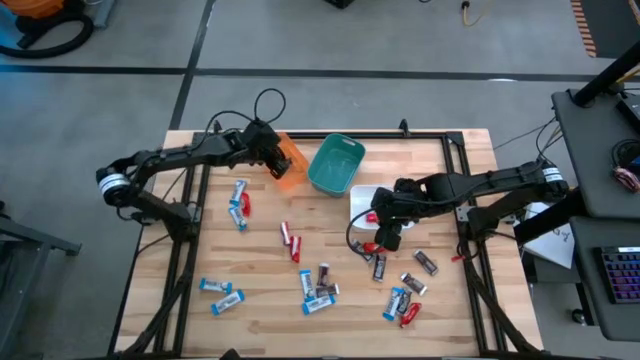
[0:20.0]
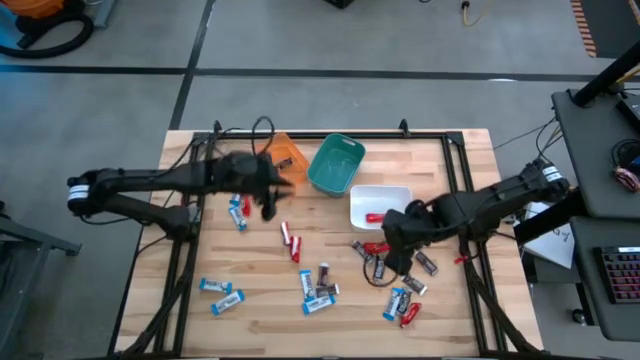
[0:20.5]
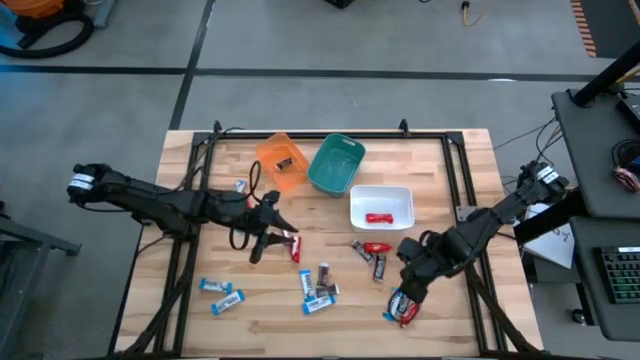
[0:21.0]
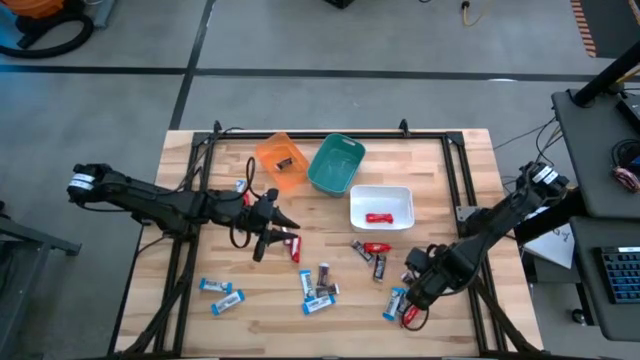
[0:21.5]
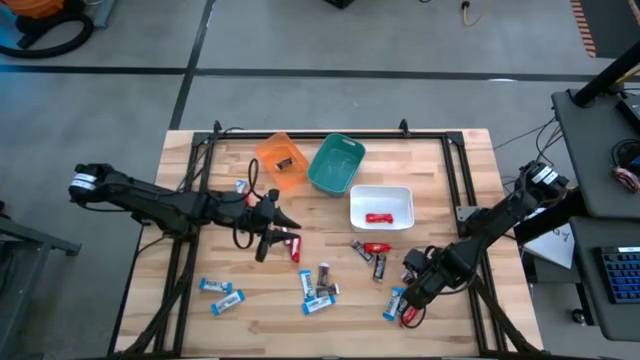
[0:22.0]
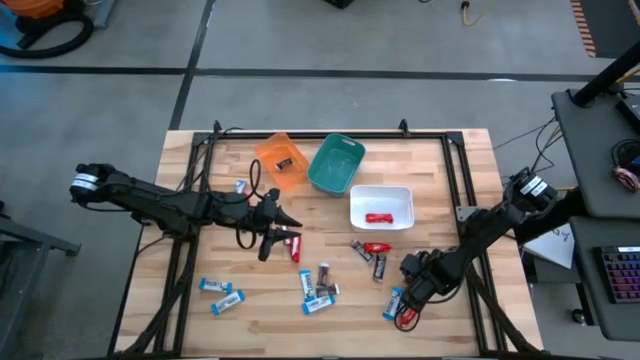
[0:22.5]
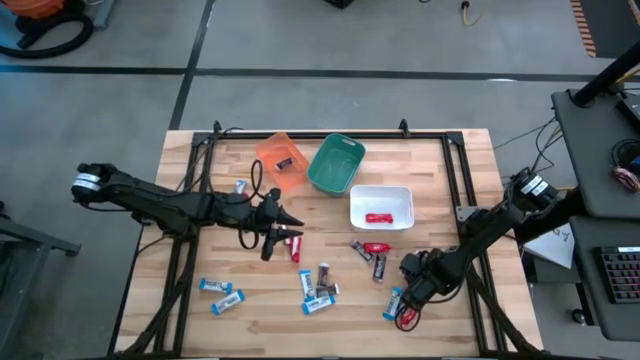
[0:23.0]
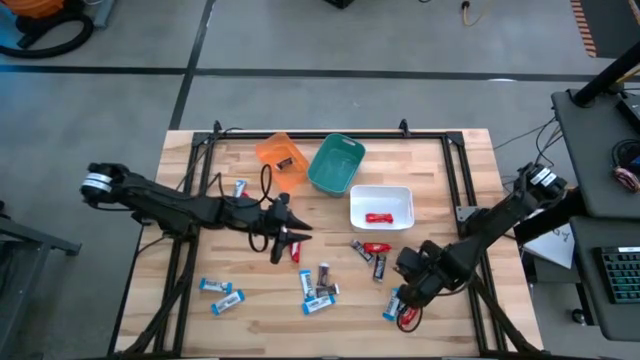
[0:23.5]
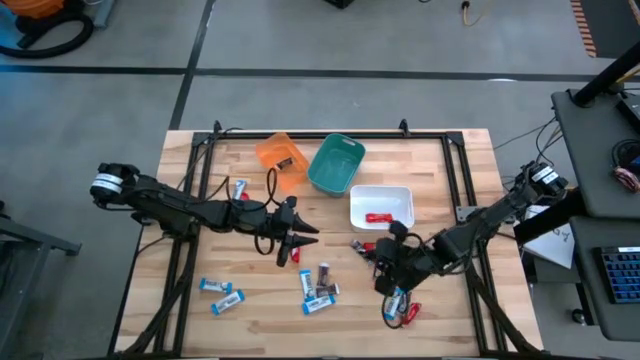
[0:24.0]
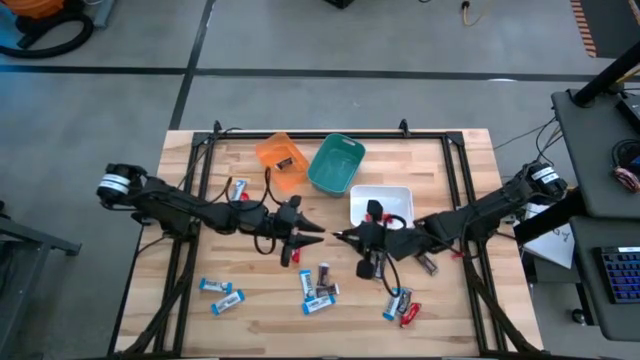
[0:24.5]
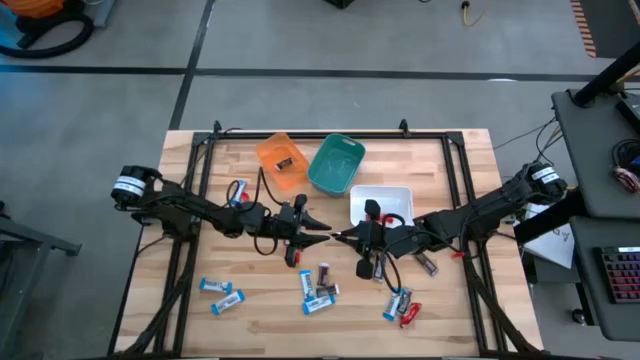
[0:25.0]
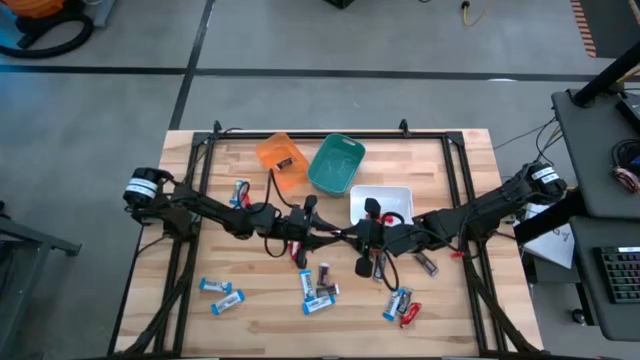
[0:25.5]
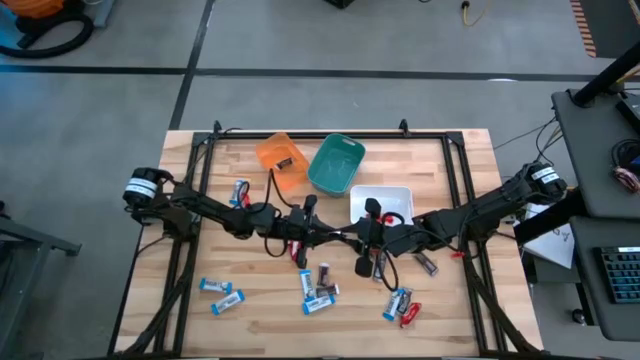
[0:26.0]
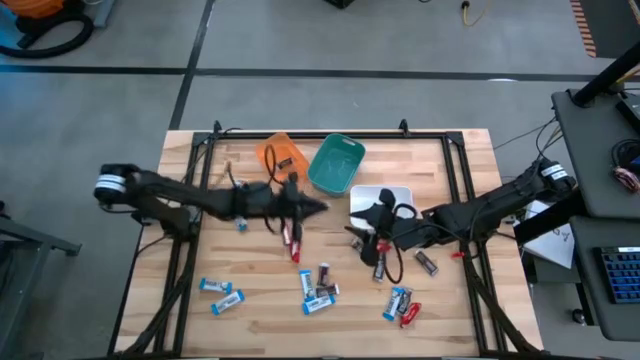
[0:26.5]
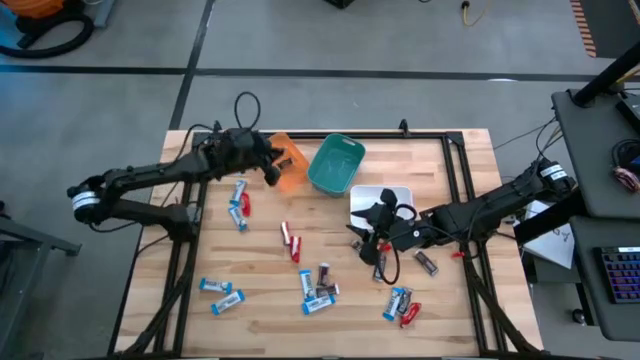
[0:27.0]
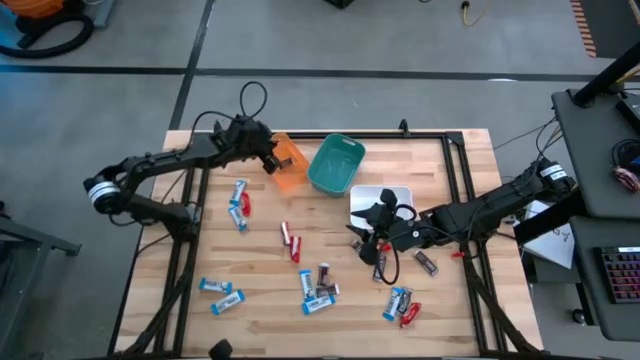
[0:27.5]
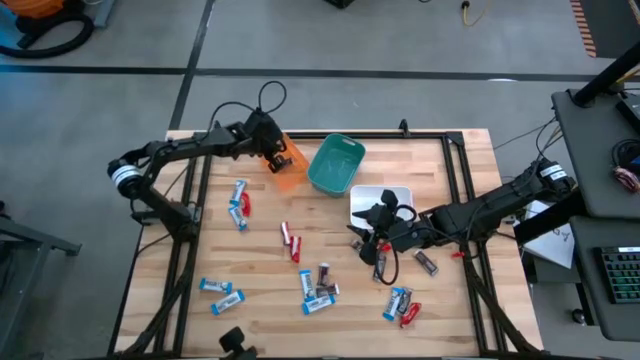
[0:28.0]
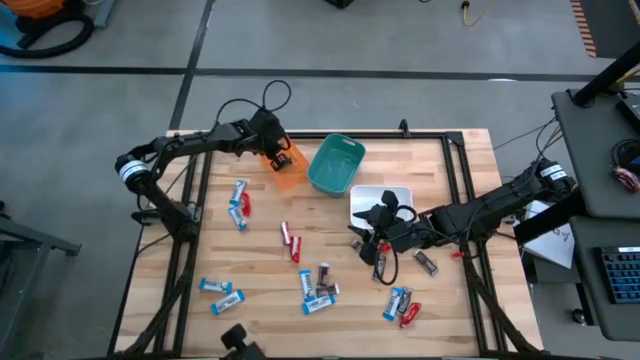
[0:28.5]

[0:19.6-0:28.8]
Task: Sort candy
Put the brown chocolate bar into the orange bin

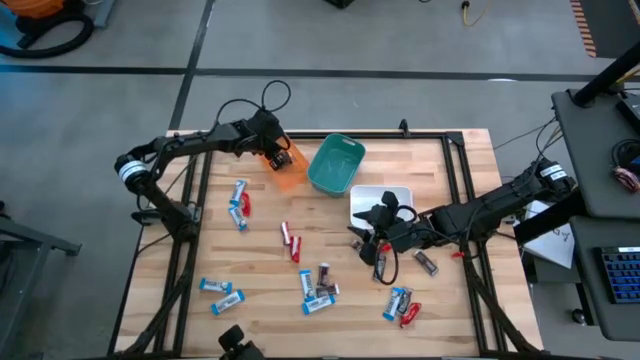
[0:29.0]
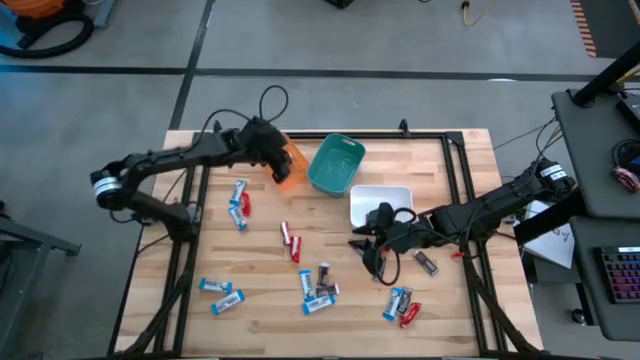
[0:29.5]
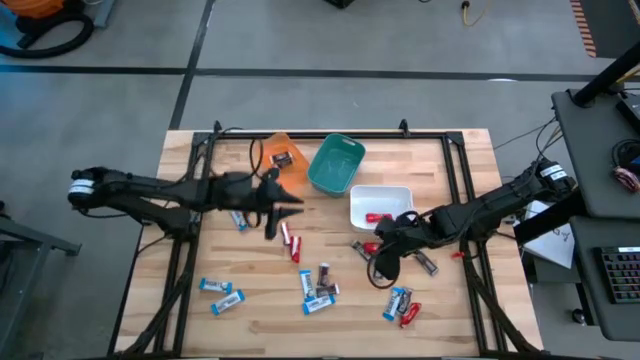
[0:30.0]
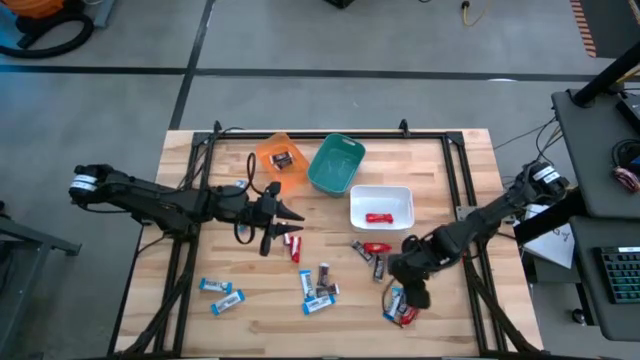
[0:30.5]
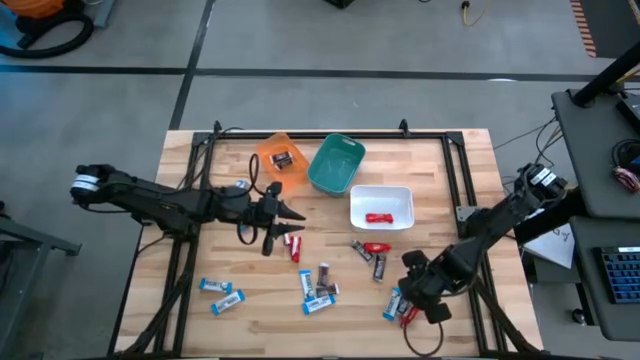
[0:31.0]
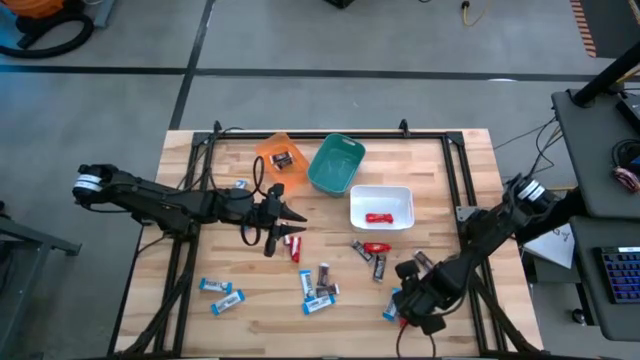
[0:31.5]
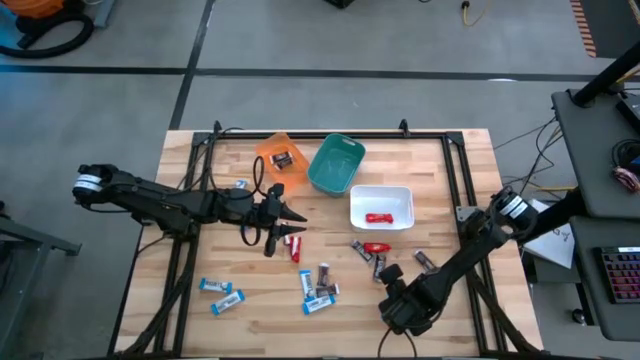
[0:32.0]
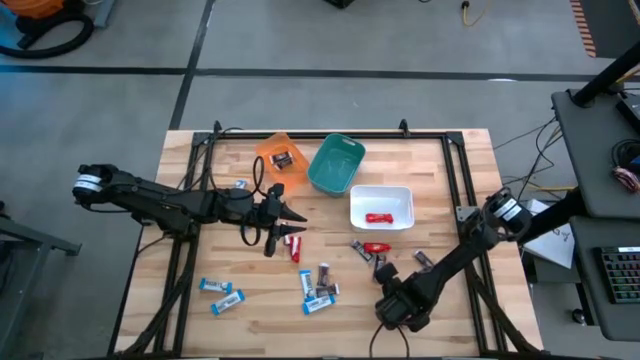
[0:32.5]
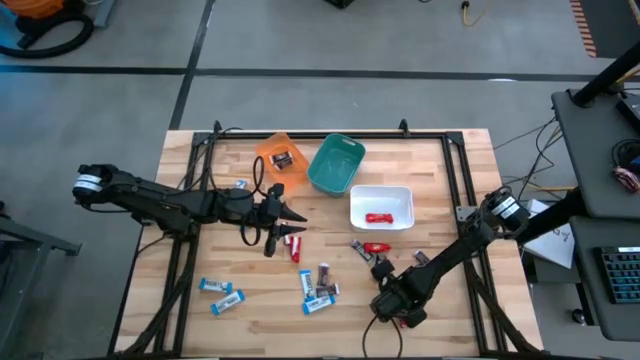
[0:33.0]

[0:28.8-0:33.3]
Put the white chocolate bar into the green bin

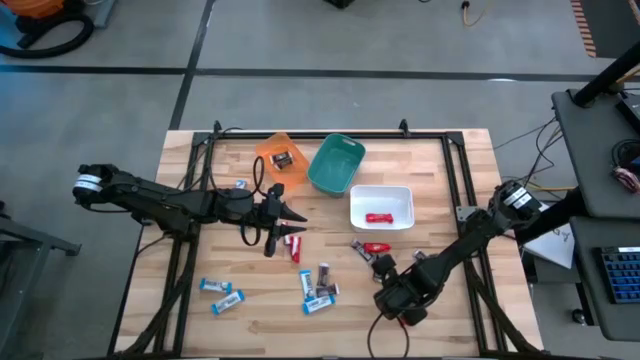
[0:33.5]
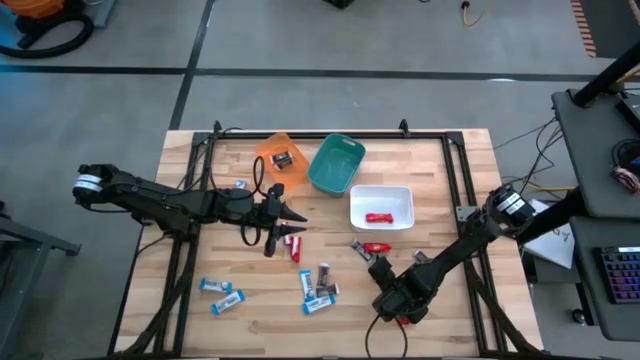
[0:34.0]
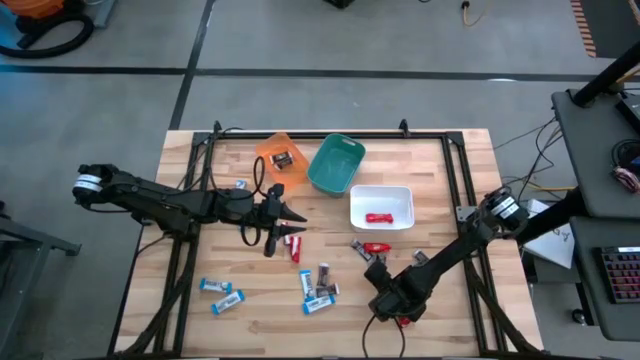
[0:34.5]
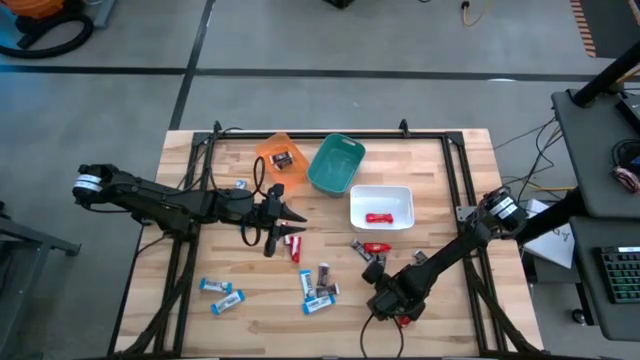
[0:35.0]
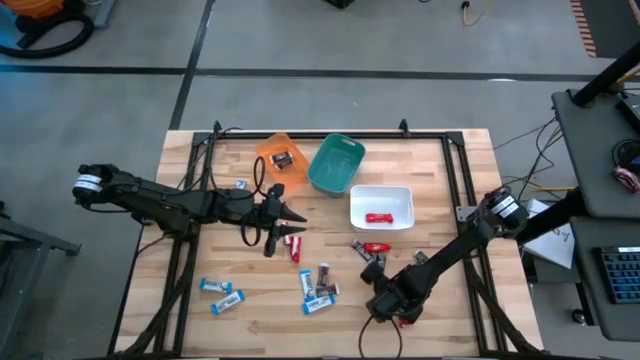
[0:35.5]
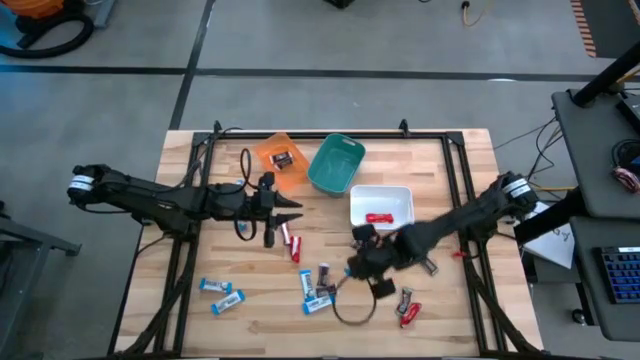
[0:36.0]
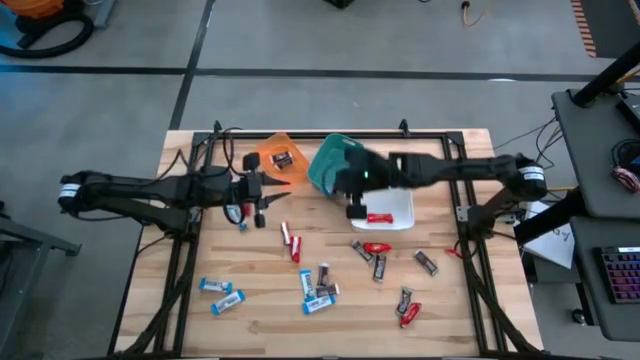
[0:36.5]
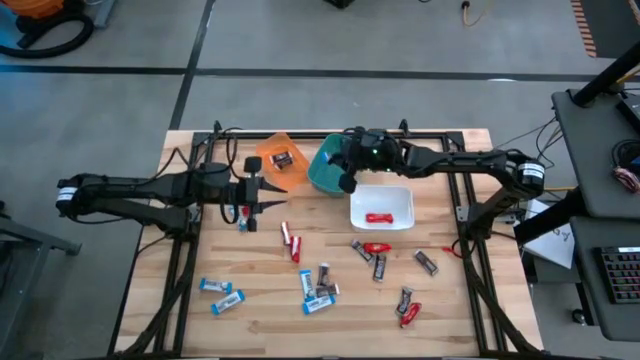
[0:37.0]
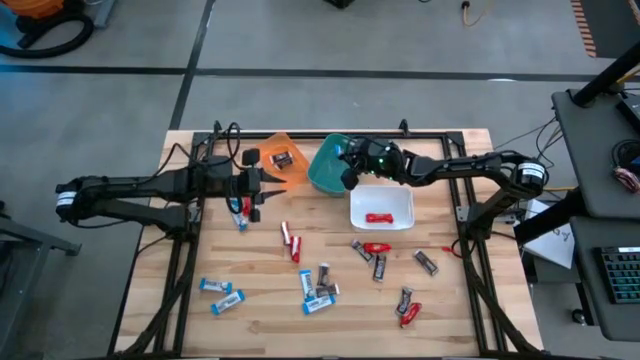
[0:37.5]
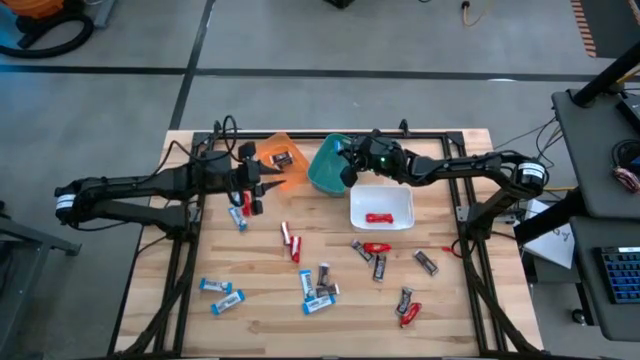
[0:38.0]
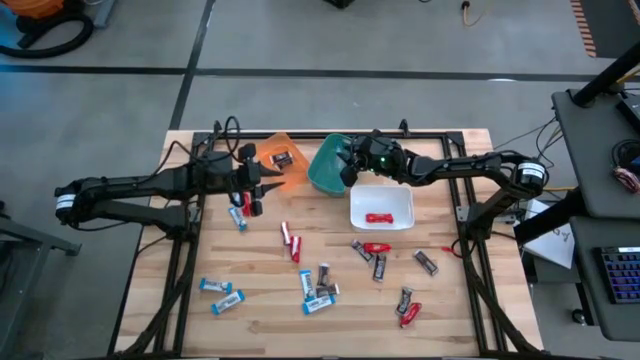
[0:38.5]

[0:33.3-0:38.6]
Put the white chocolate bar into the green bin

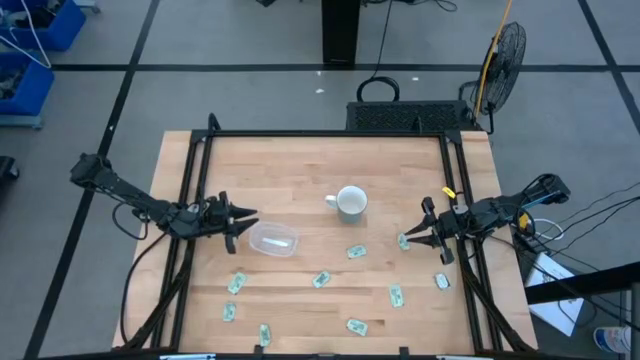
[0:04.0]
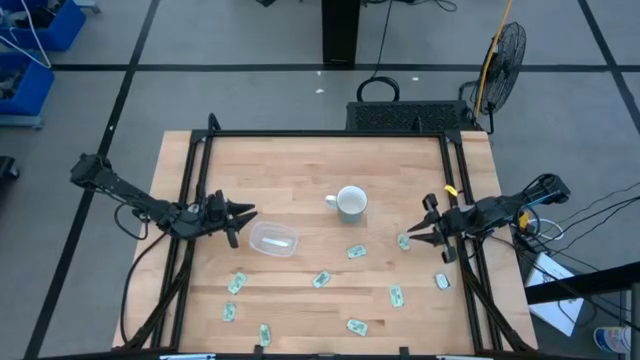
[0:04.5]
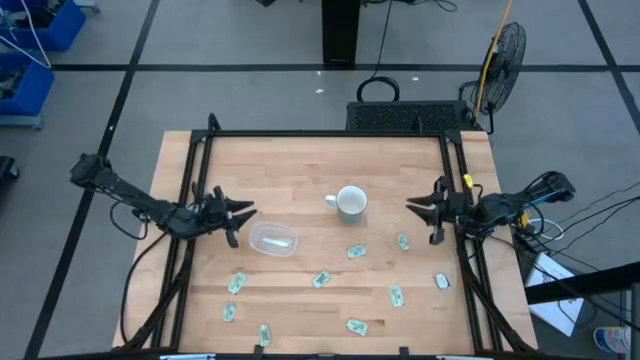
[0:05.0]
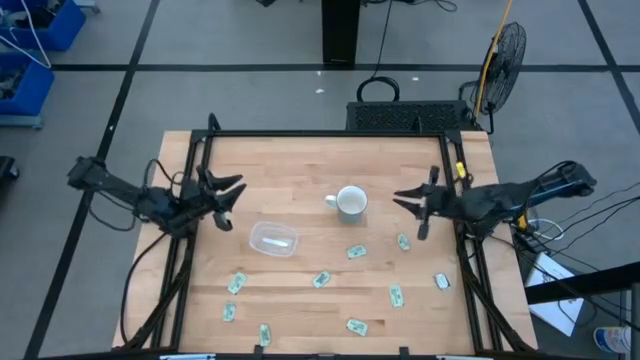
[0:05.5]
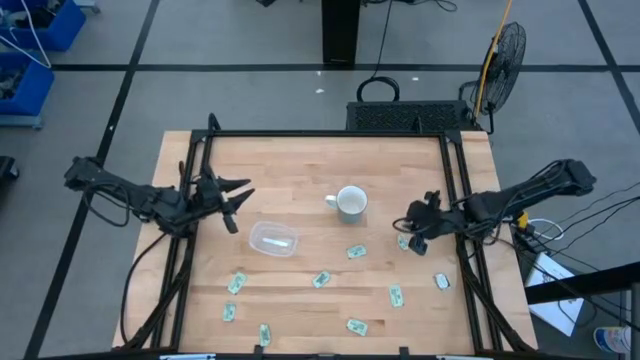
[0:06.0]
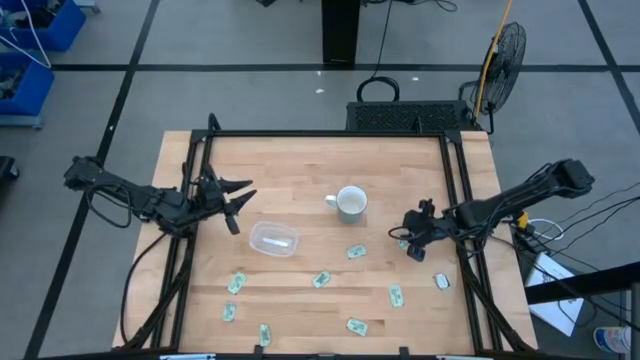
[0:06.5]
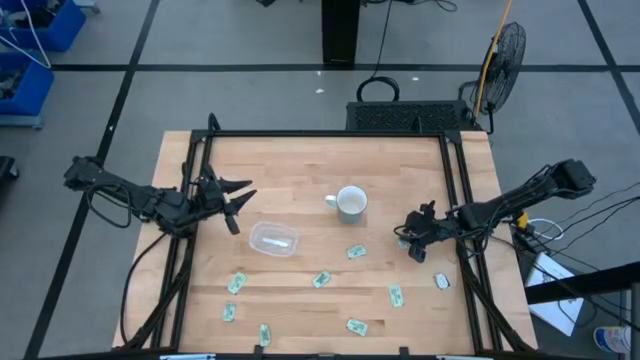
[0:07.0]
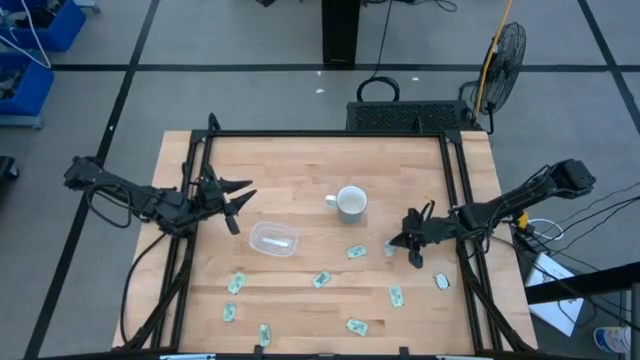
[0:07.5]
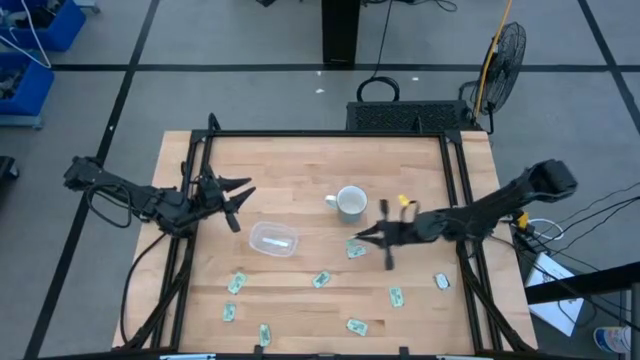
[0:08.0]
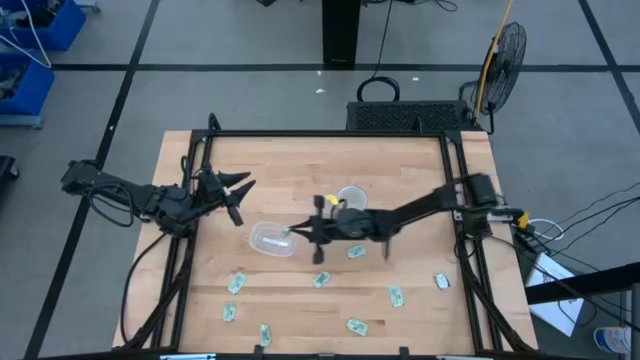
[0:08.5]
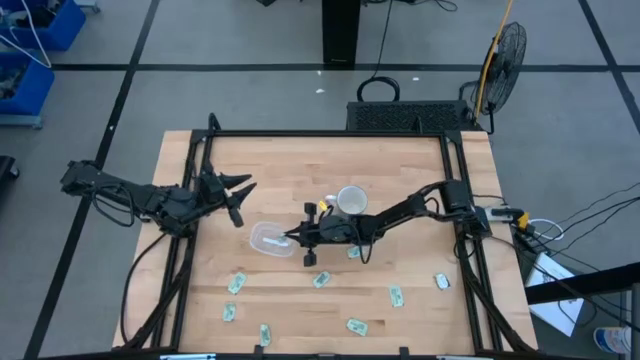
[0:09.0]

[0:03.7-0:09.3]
Task: Pick and place Stevia / Truvia into bins
Put the green stevia packet into the transparent bin
